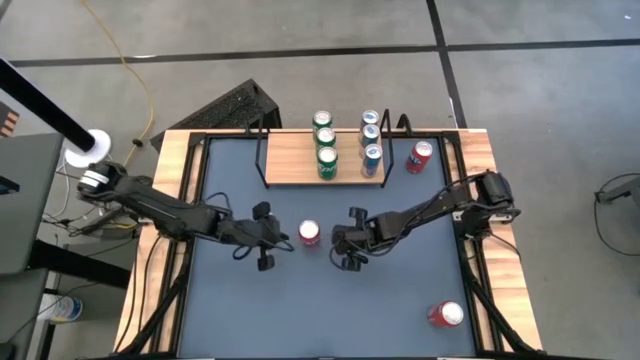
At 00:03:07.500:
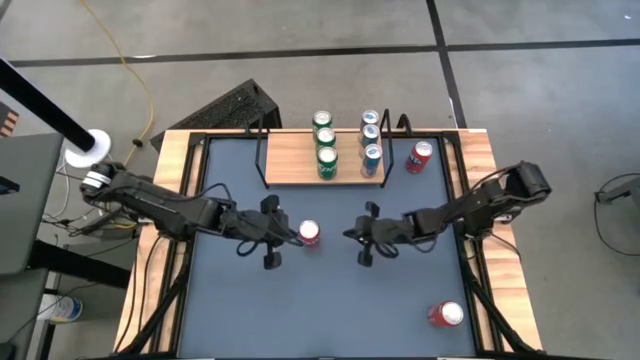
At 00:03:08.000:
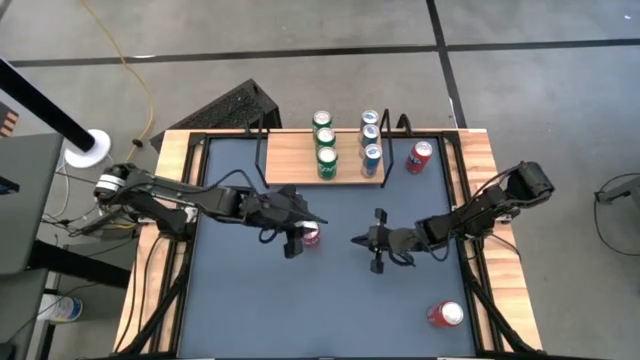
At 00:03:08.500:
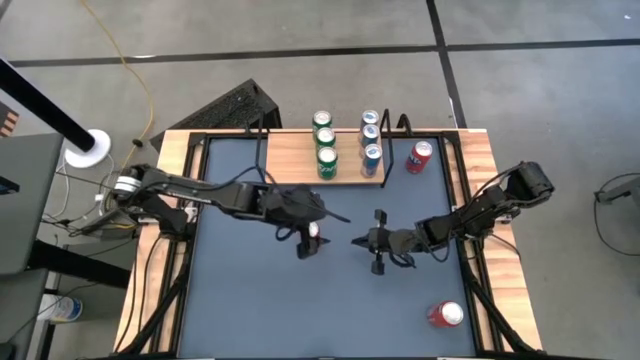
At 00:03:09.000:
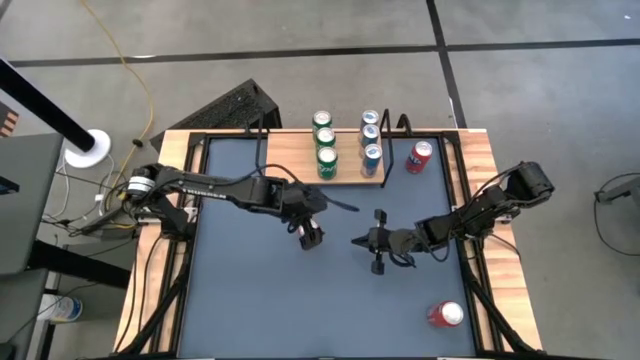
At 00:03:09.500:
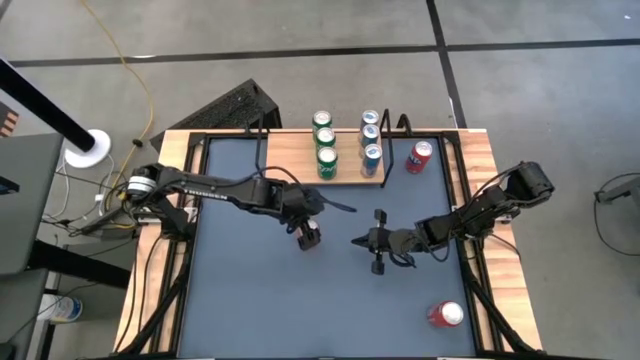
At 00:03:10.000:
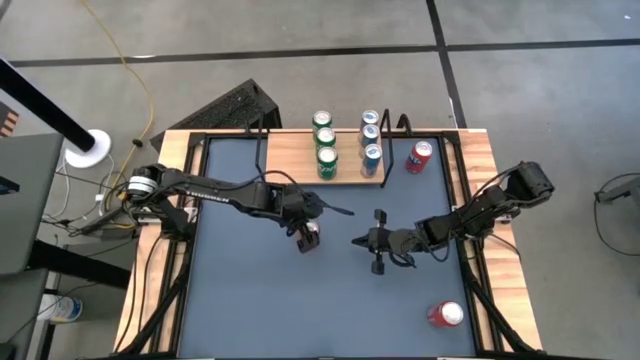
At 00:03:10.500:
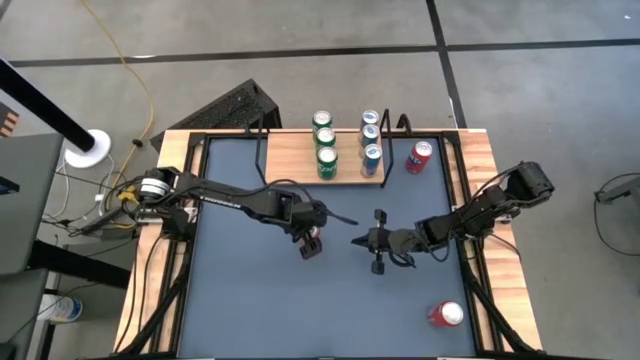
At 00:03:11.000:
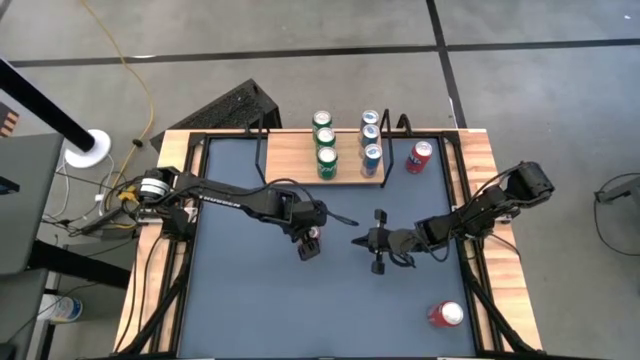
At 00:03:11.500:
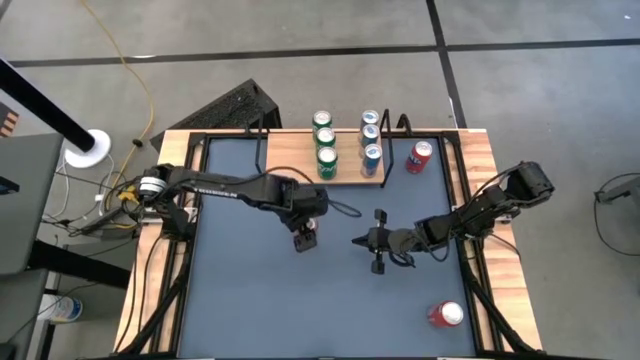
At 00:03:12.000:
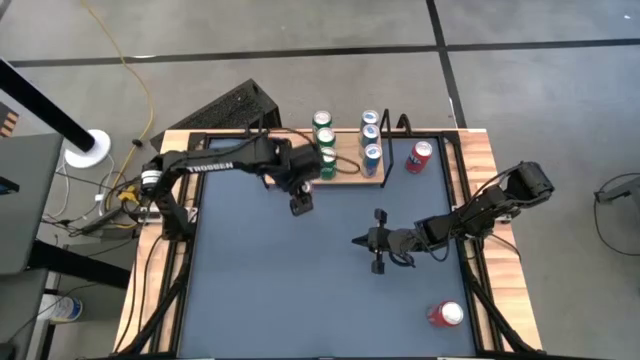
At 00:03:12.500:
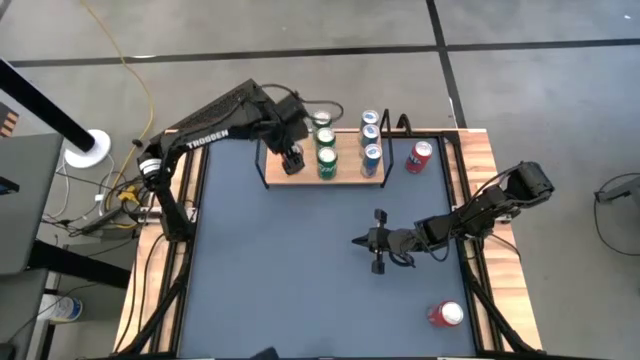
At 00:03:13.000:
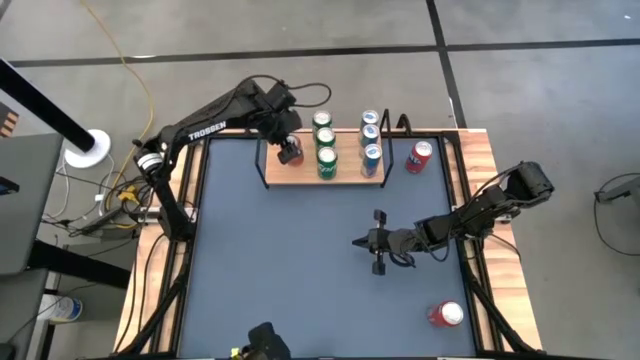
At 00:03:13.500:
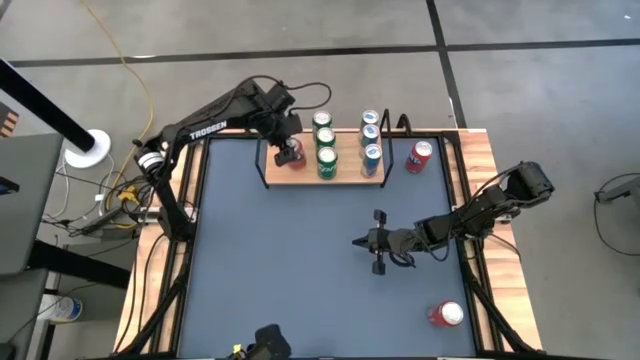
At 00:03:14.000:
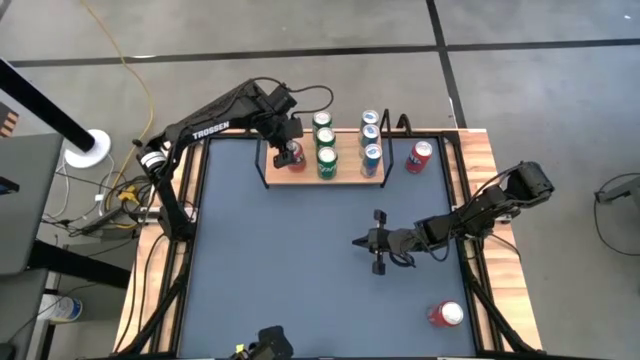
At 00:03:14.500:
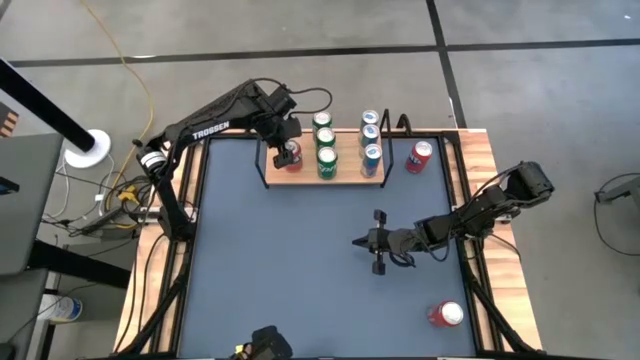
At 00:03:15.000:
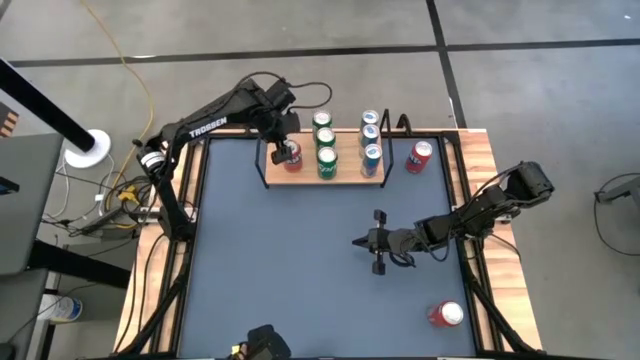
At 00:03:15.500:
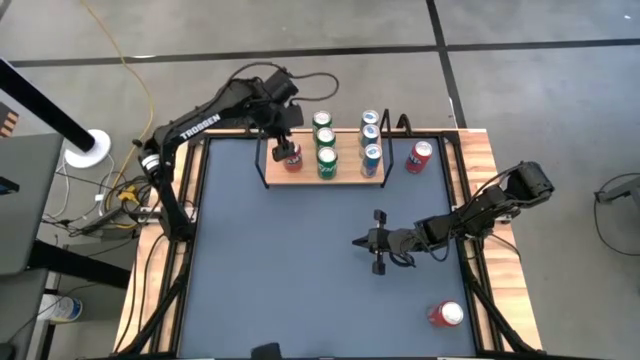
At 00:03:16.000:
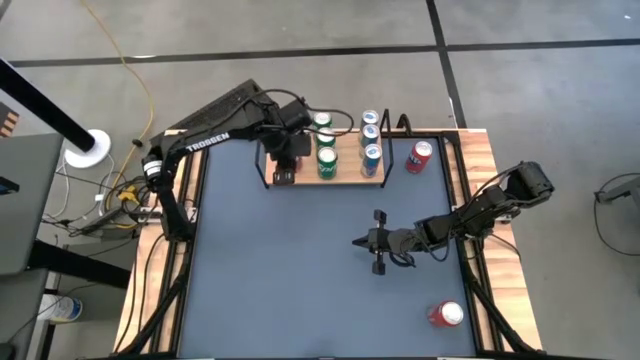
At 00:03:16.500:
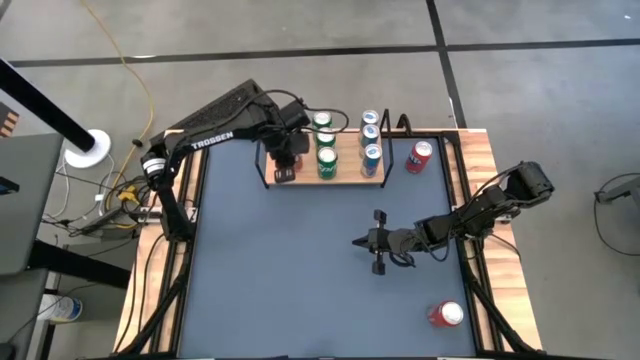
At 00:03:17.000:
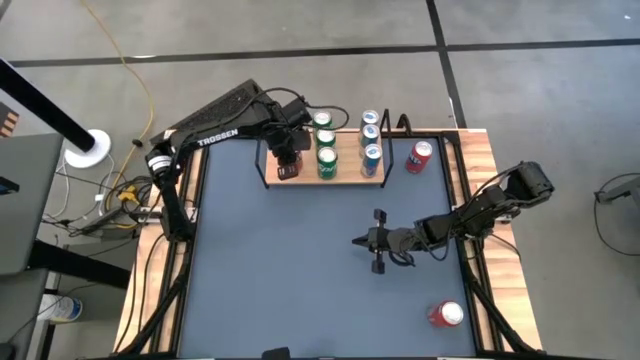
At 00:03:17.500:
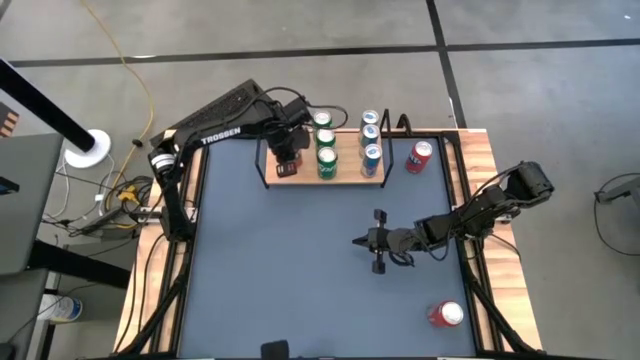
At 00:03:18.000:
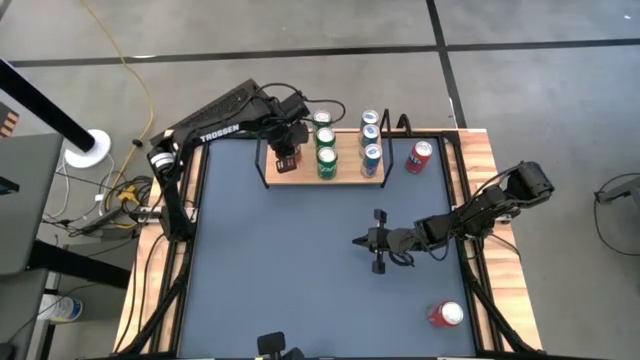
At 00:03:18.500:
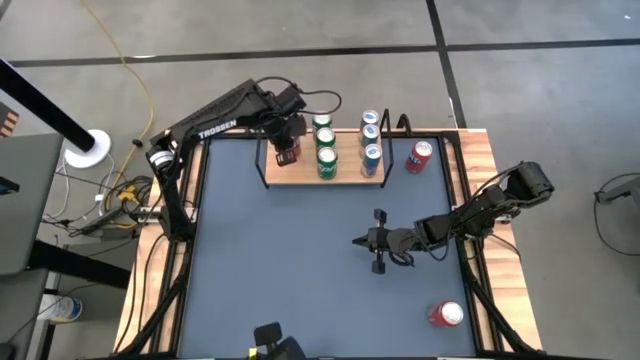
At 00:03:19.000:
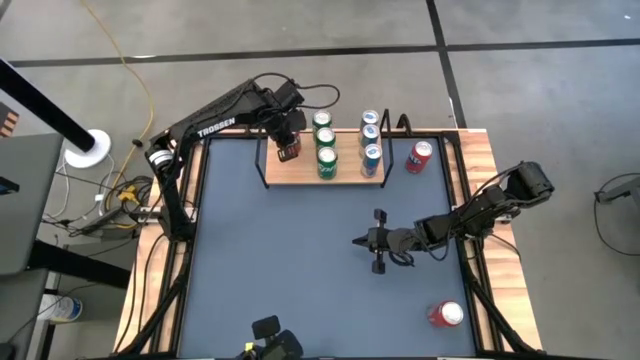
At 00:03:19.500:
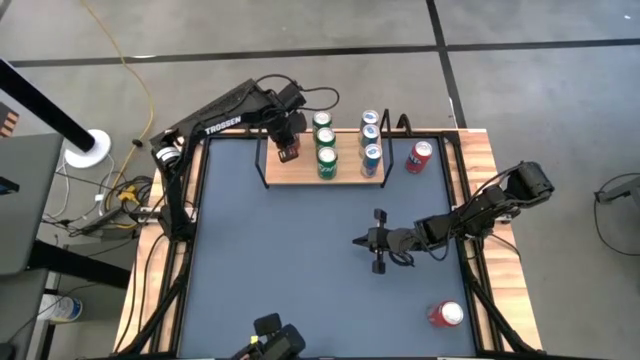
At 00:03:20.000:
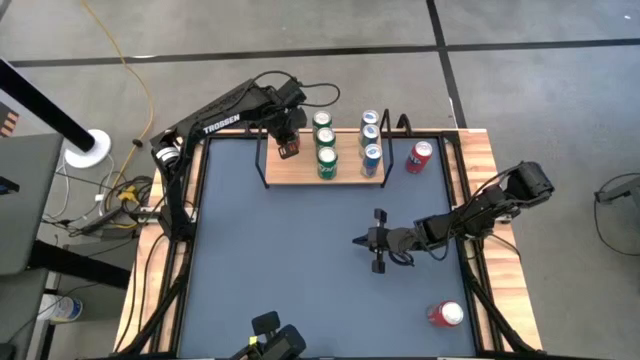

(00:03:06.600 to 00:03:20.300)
Task: Place canned beverage on shelf
Put the middle red soda can on the shelf

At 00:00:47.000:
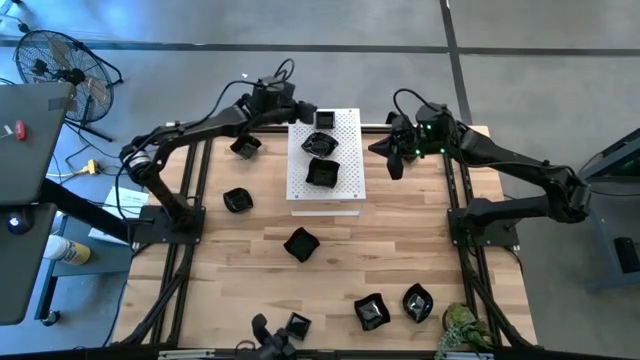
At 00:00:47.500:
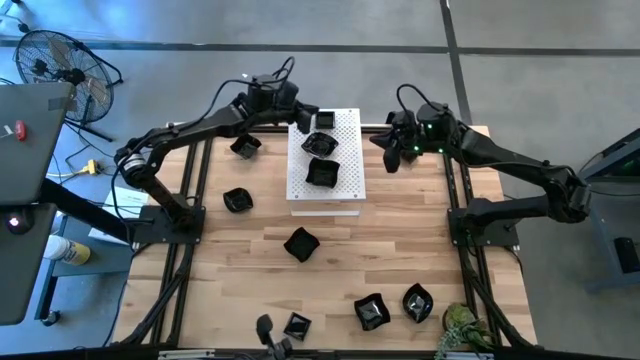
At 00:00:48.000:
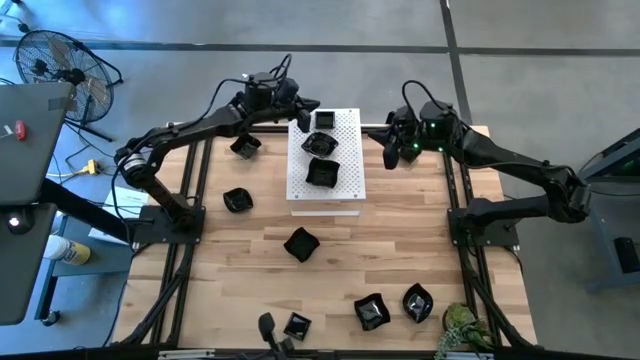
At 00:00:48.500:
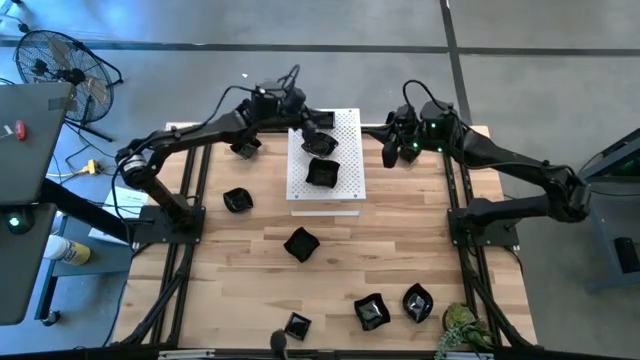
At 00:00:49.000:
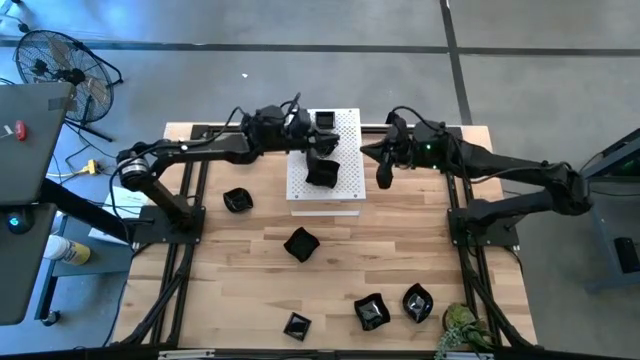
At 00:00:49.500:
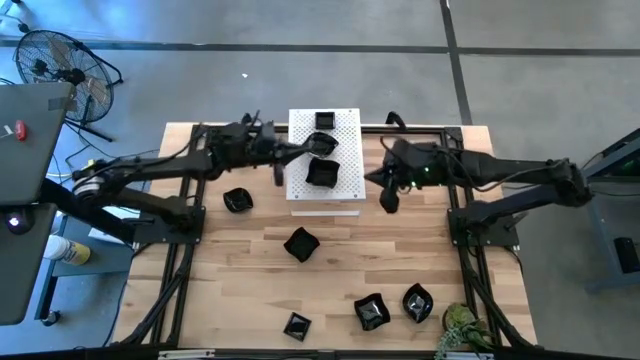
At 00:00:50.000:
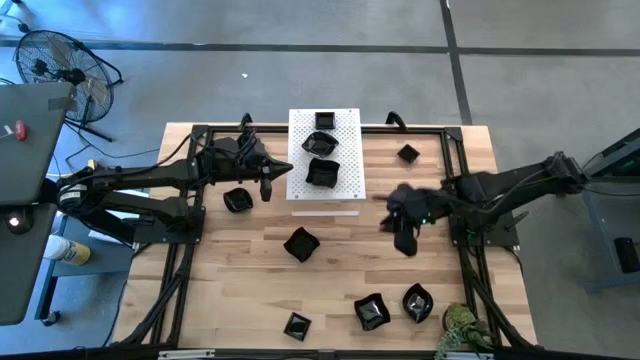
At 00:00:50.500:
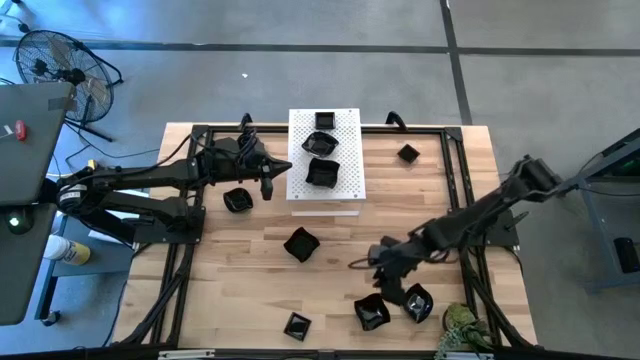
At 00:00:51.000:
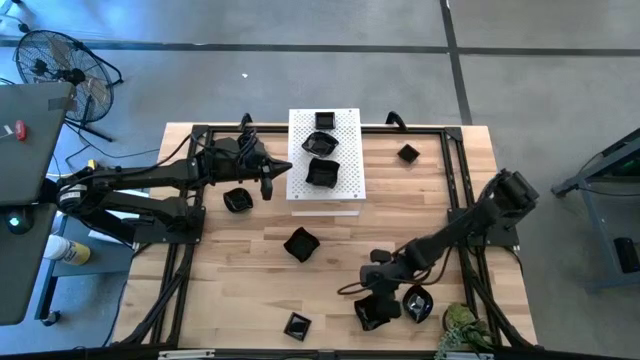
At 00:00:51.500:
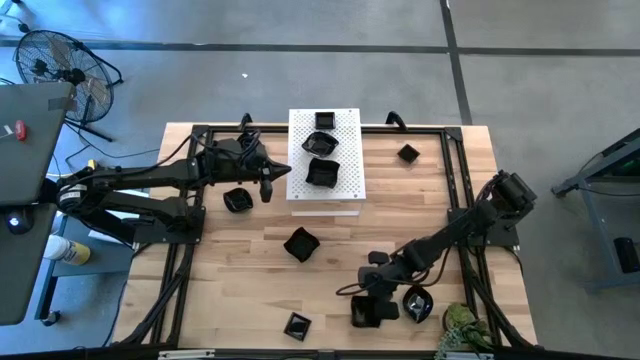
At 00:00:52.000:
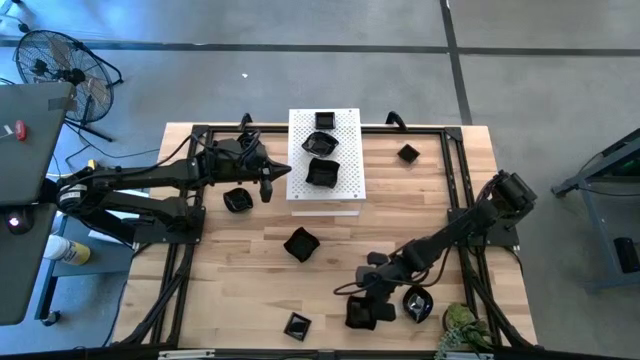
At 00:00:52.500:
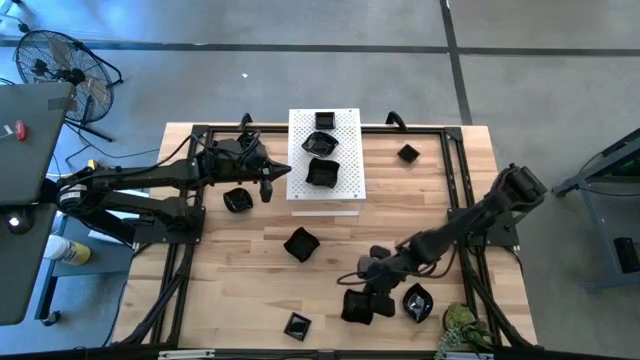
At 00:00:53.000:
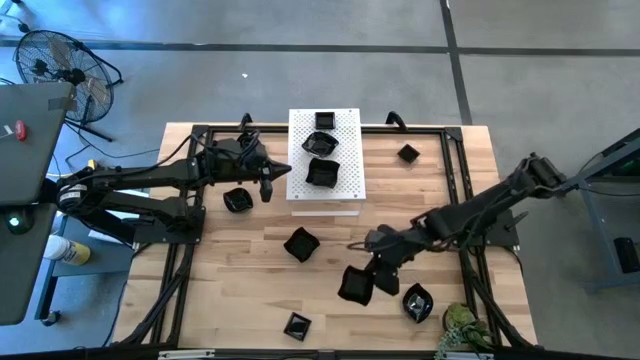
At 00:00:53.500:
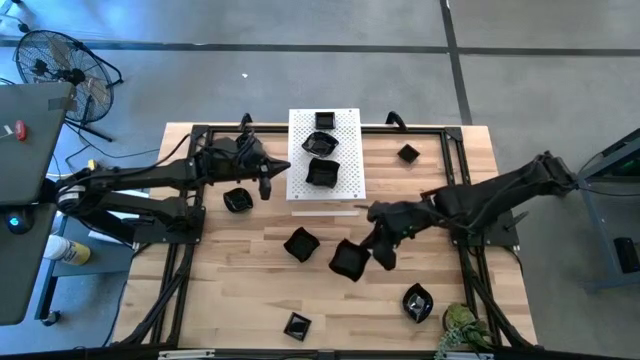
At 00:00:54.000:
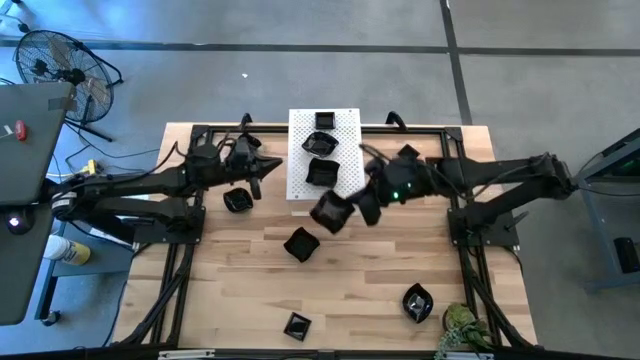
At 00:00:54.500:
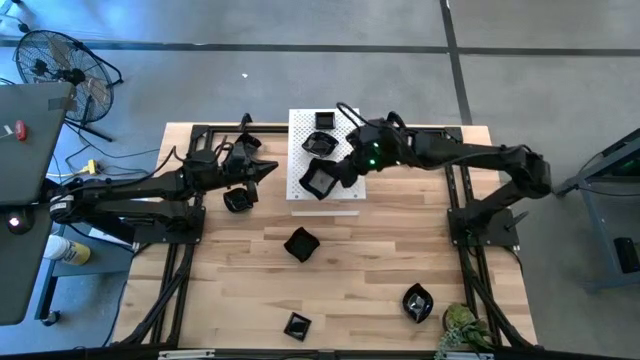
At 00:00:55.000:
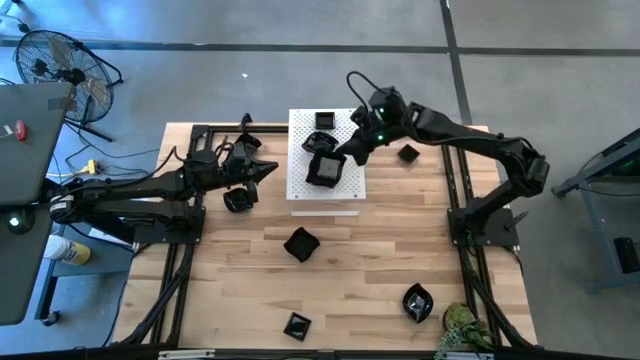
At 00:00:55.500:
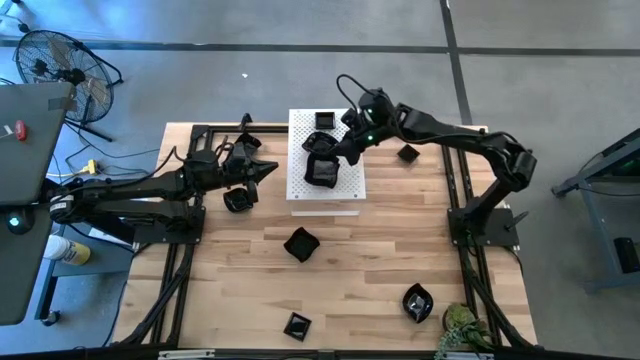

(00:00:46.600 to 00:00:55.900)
Task: Pick & Place Mini shaped plates
Stack the distorted square plate on top of the distorted square plate on the shelf
